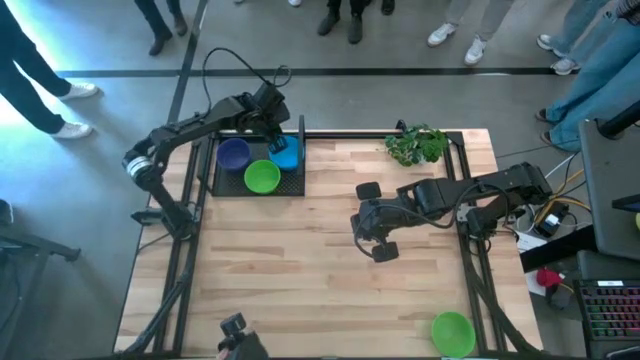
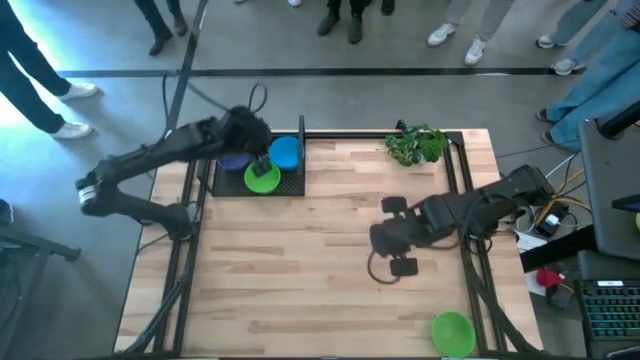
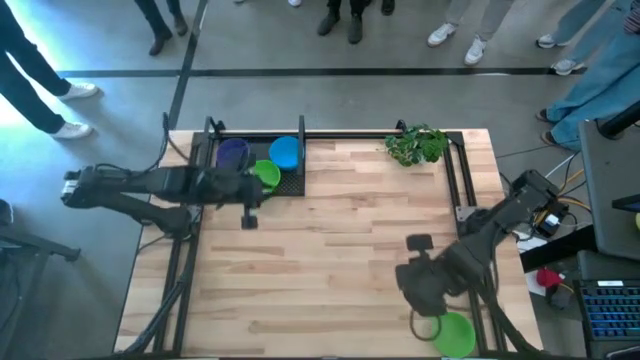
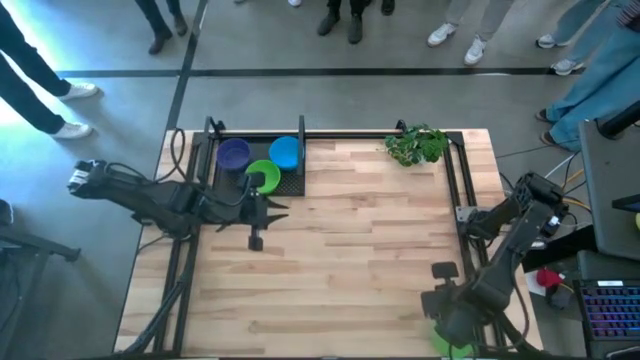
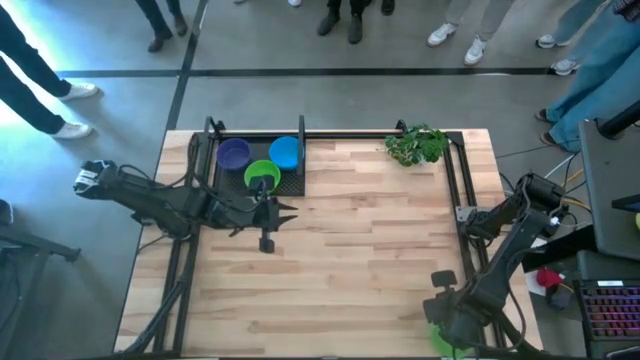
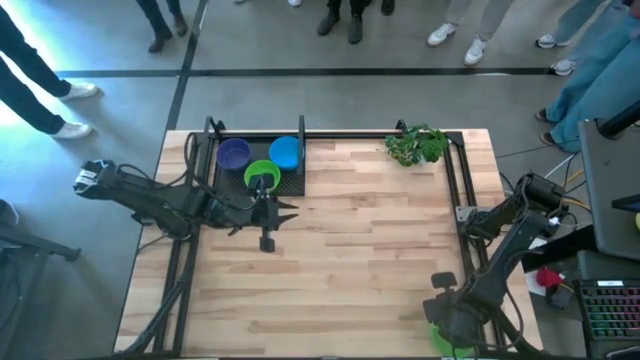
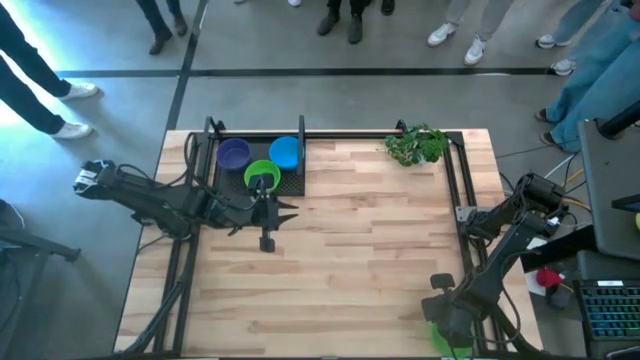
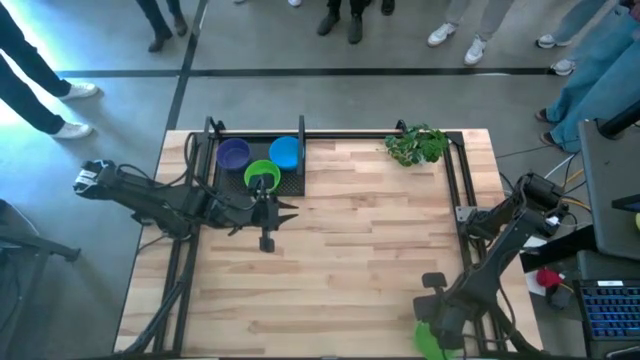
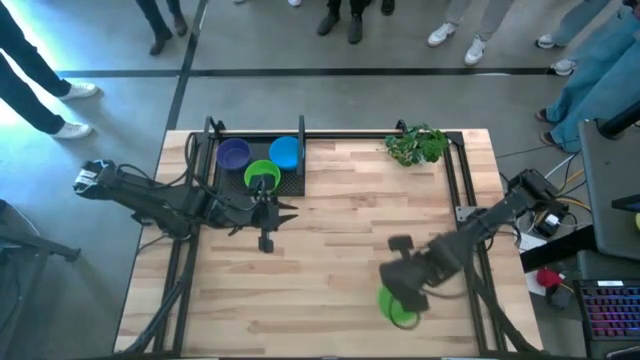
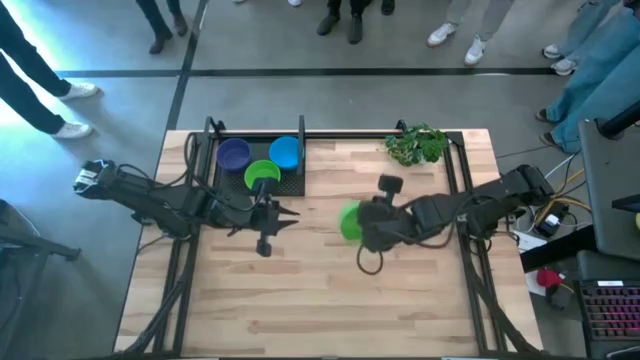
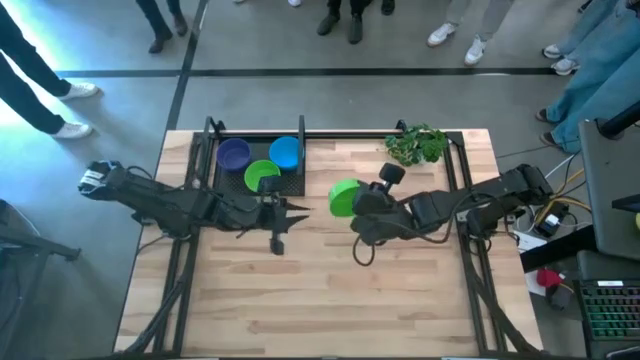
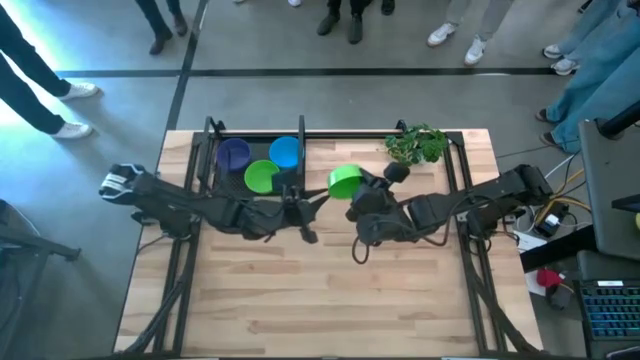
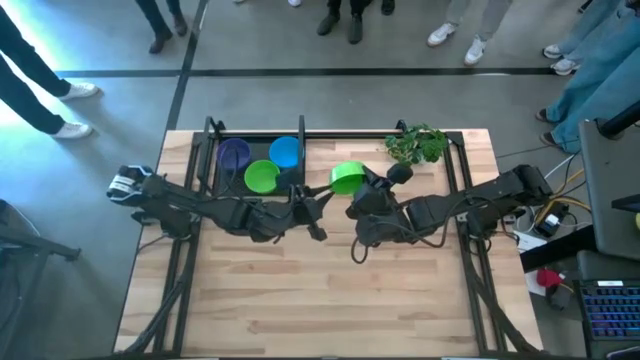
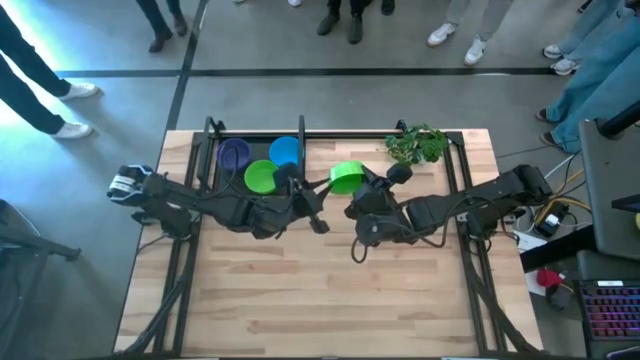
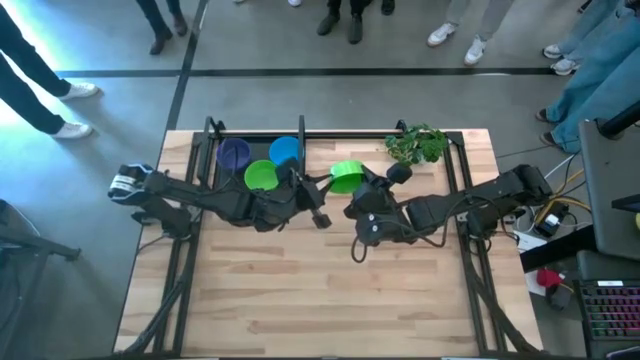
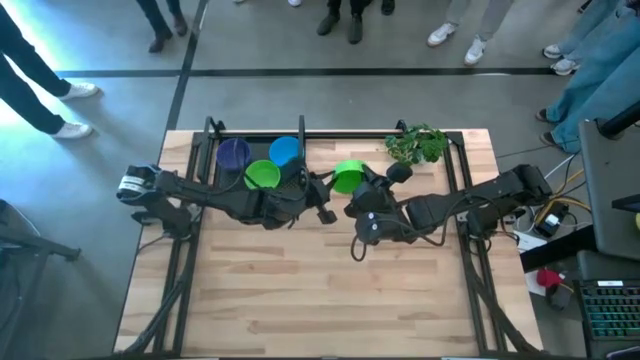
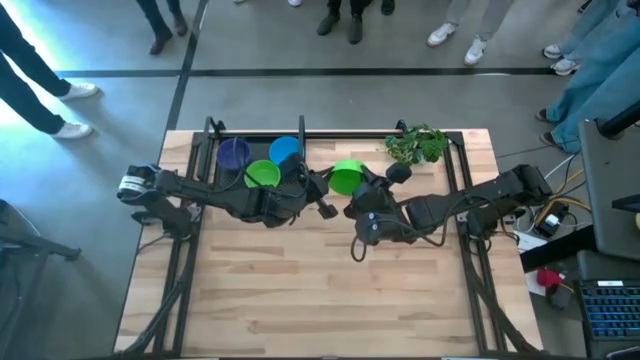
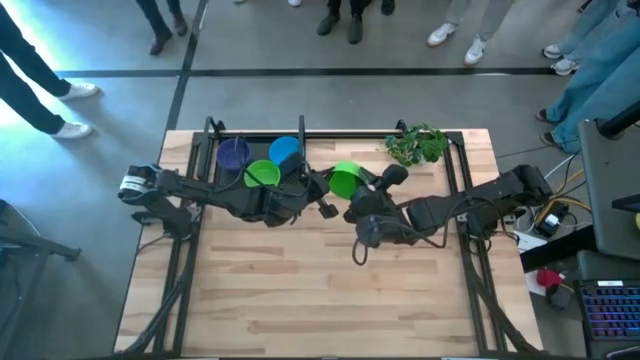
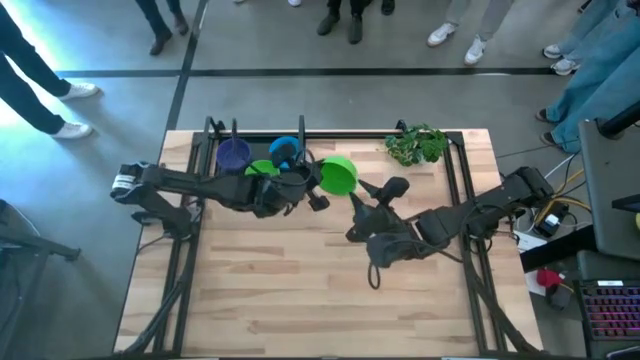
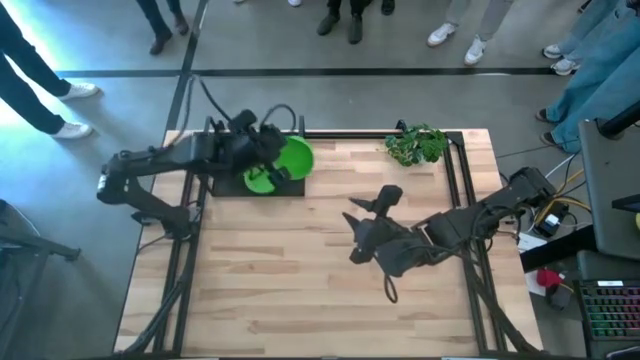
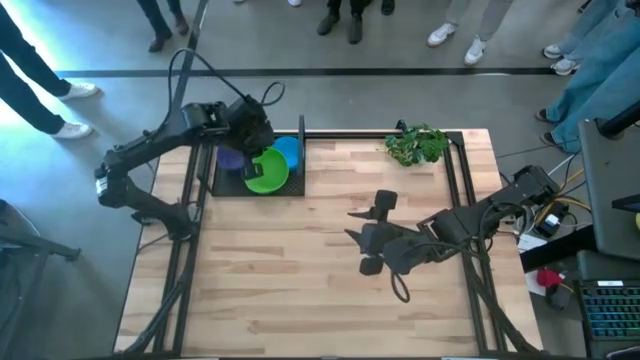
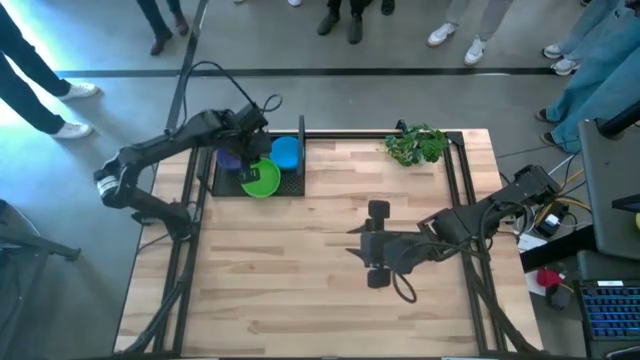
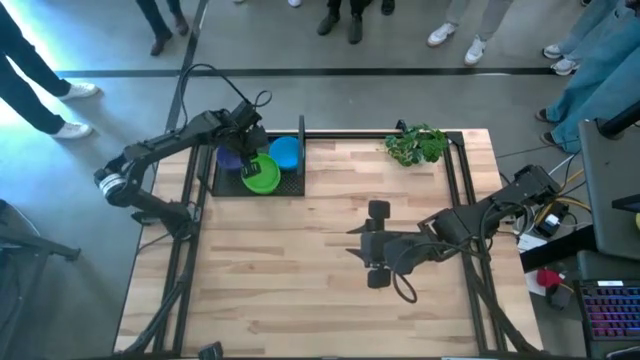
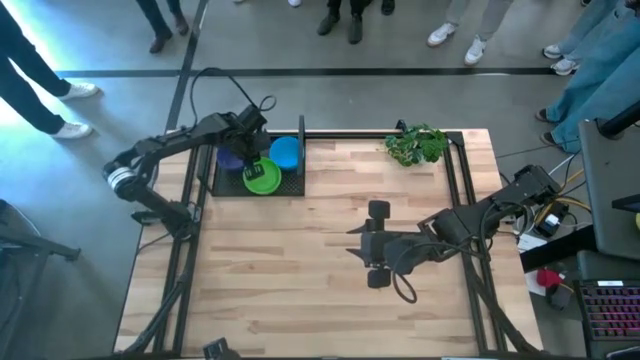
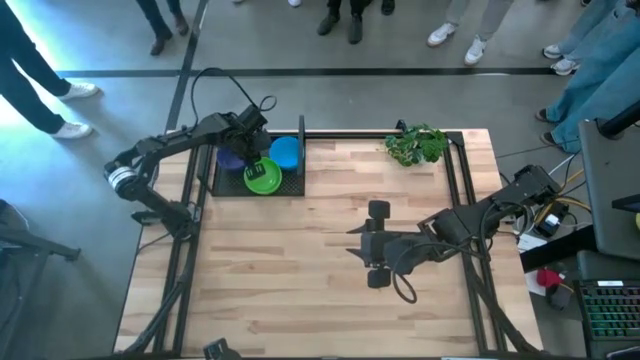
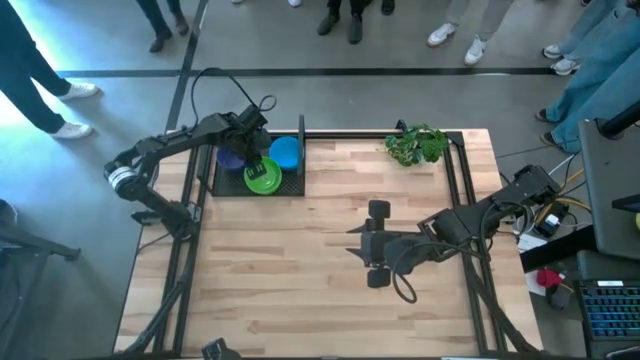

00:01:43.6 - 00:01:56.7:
Task: Pick & Place Mini bowls
Stack the green bowl on the green bowl on the shelf

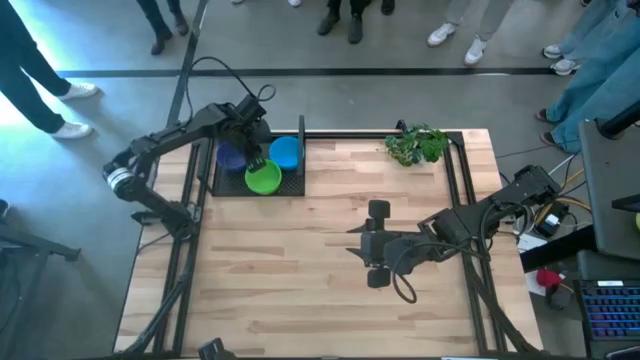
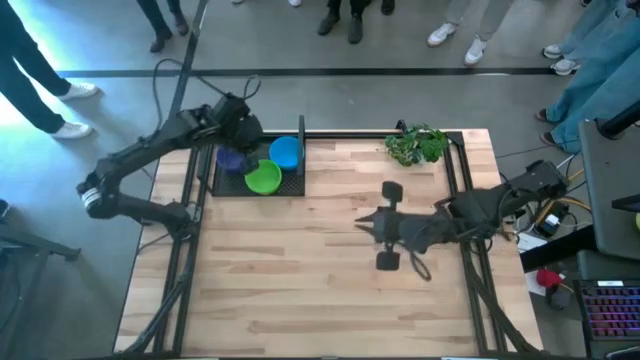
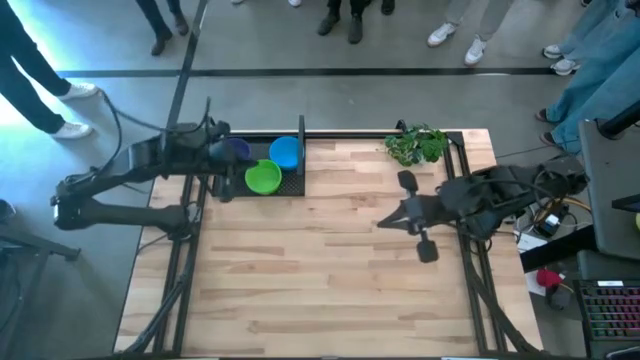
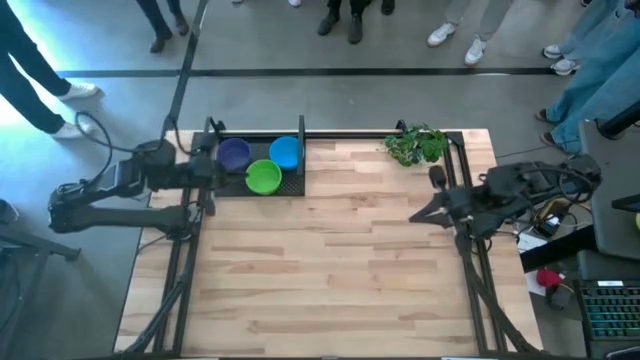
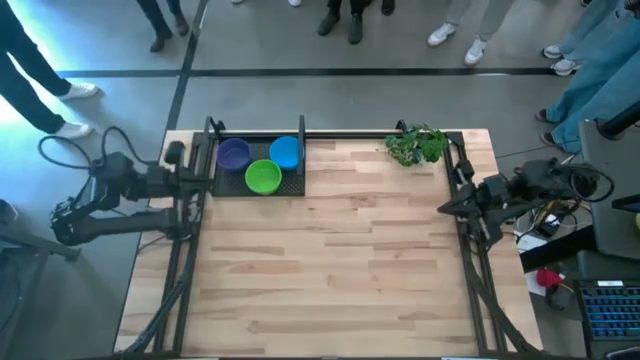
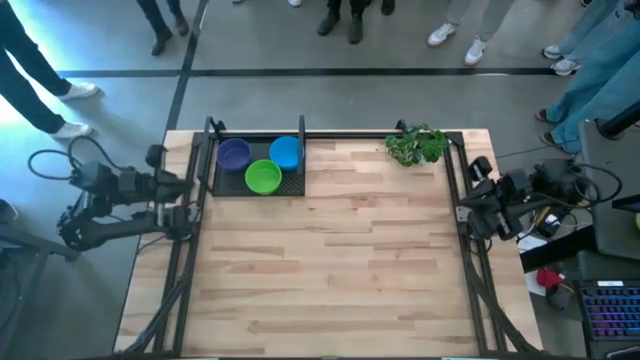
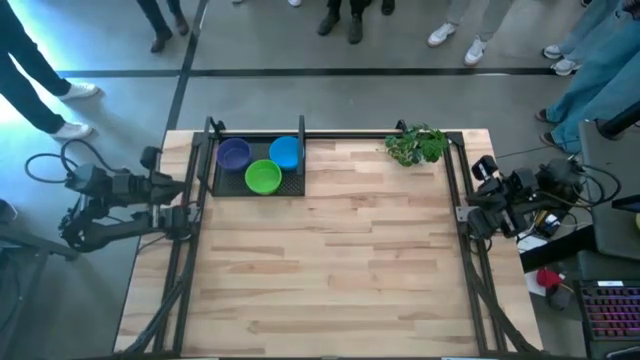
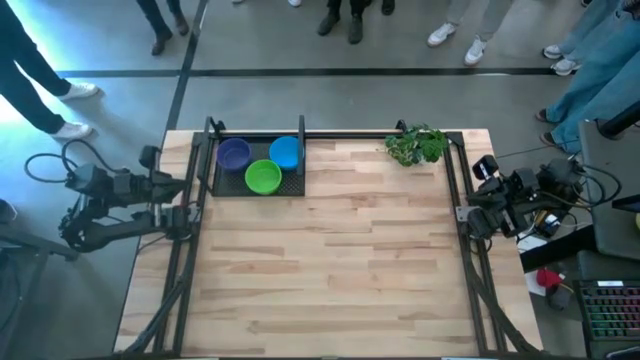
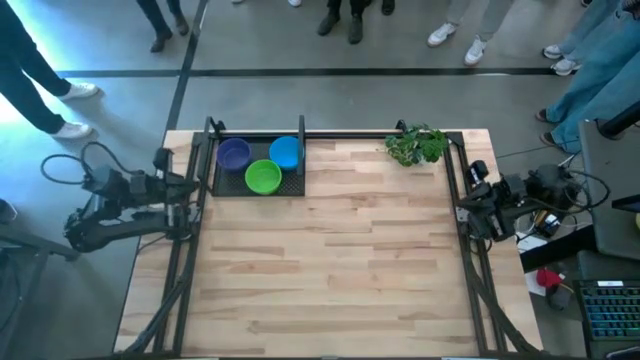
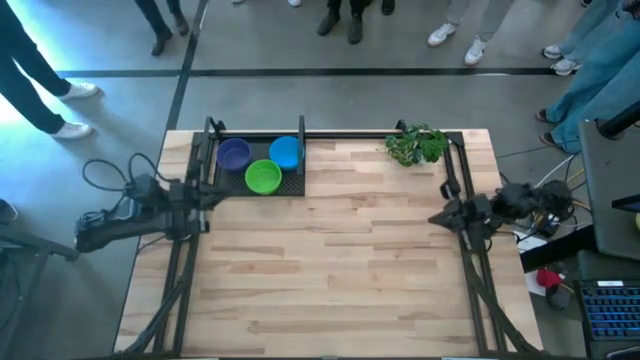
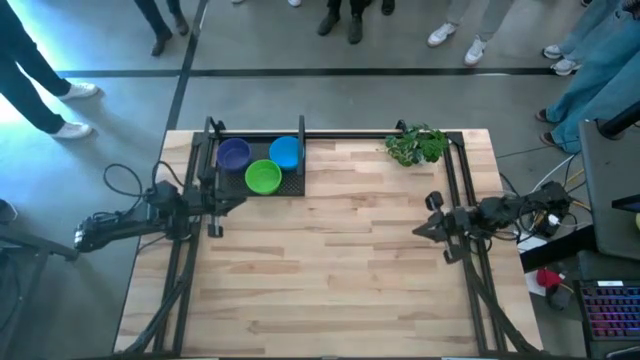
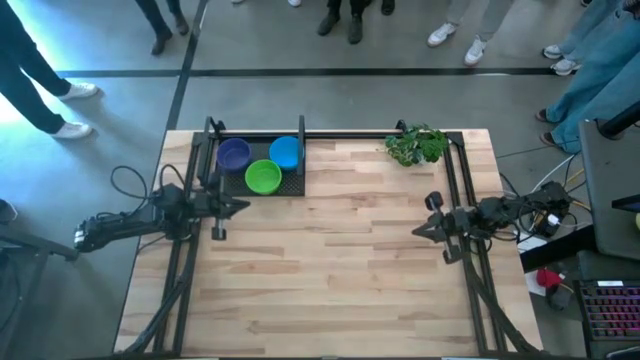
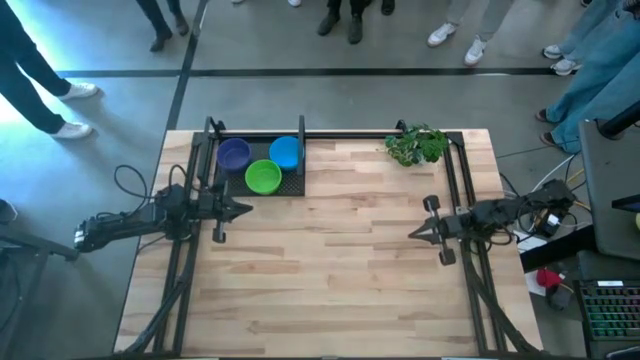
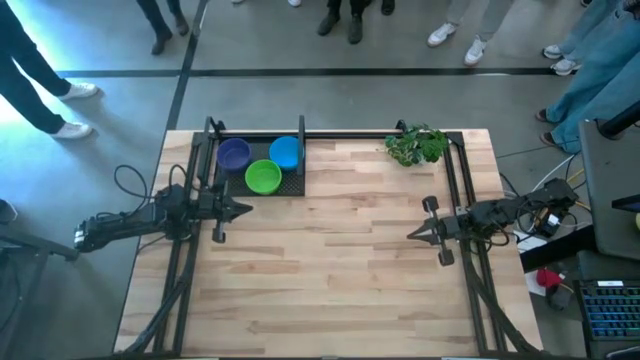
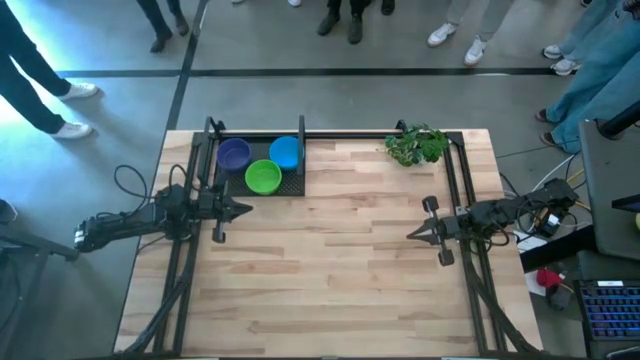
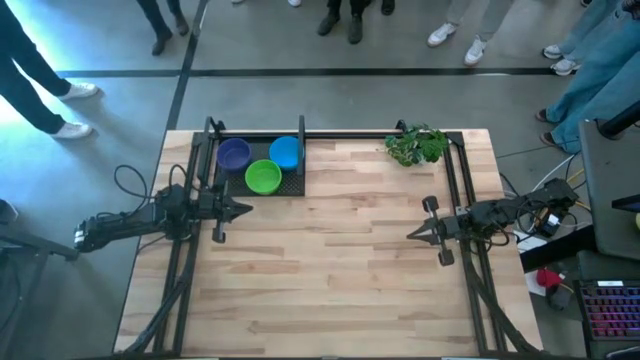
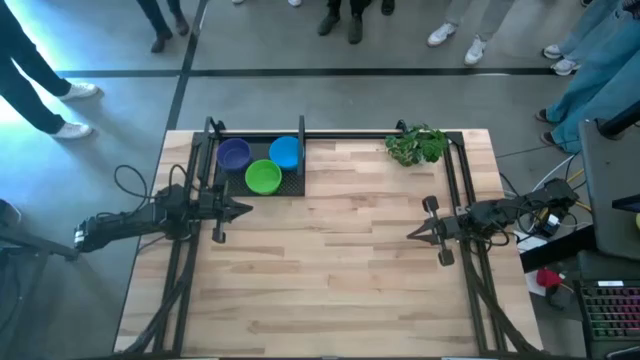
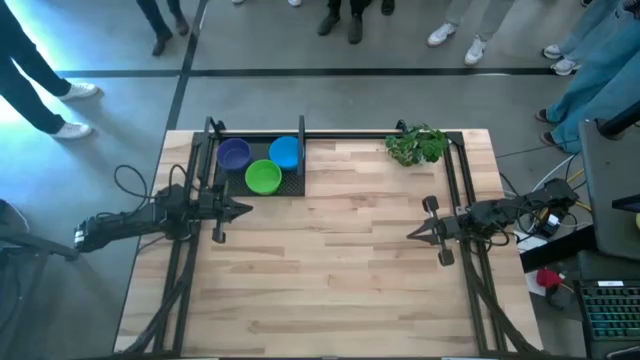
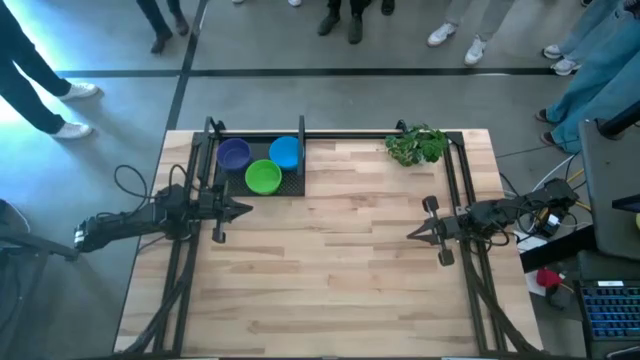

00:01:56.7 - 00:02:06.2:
Return to home position
